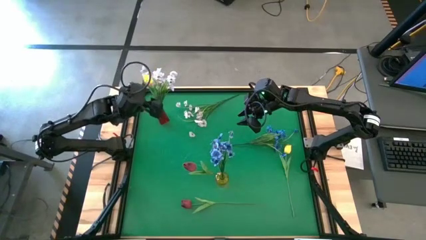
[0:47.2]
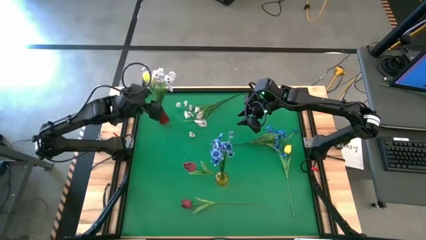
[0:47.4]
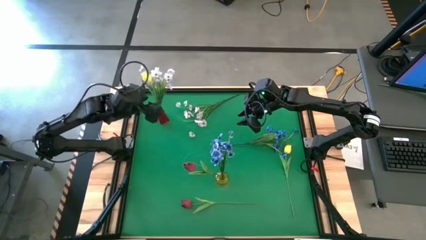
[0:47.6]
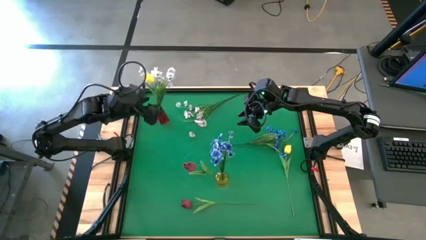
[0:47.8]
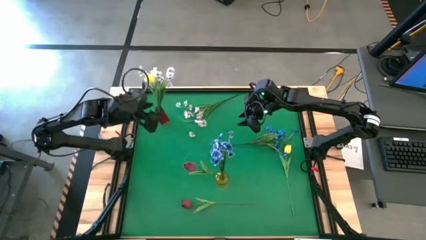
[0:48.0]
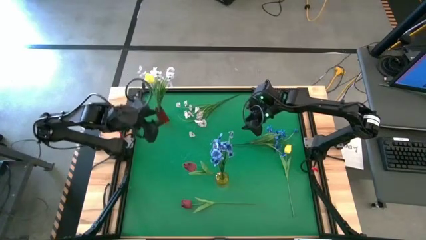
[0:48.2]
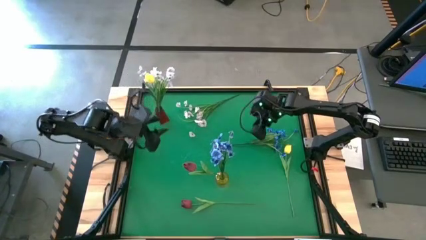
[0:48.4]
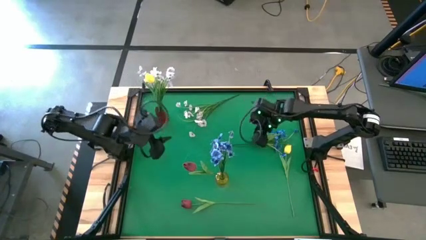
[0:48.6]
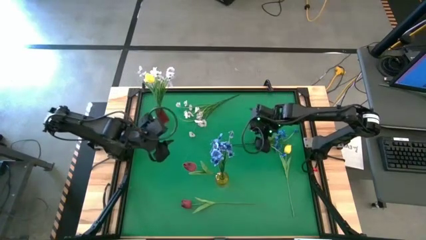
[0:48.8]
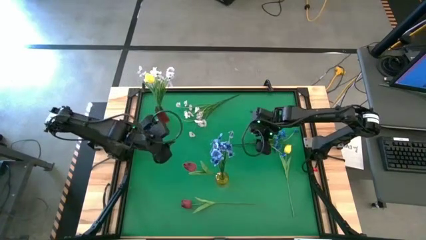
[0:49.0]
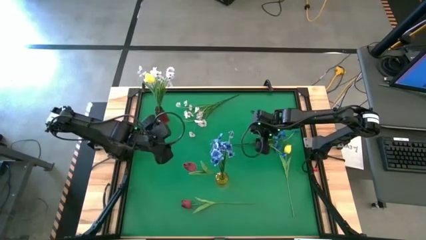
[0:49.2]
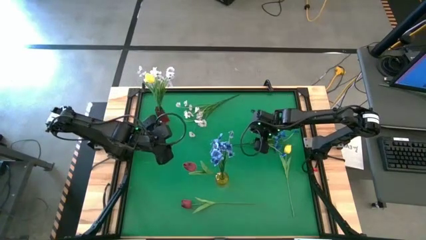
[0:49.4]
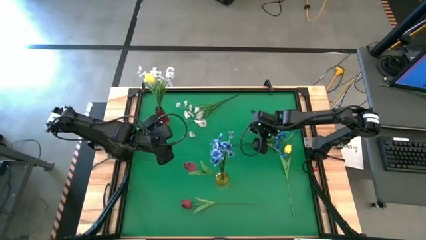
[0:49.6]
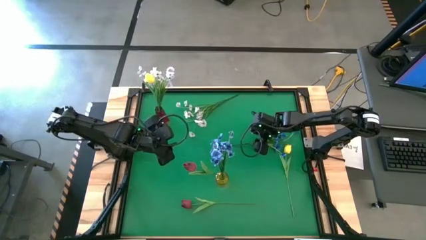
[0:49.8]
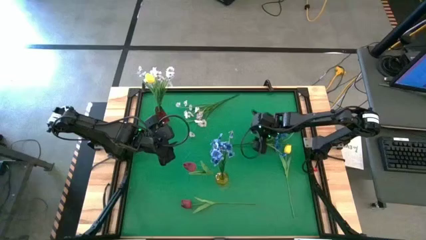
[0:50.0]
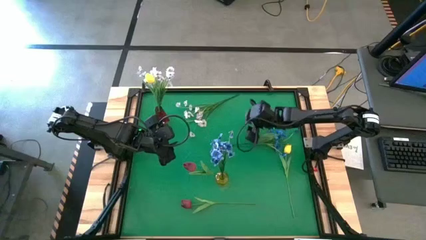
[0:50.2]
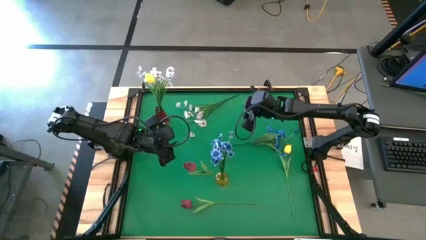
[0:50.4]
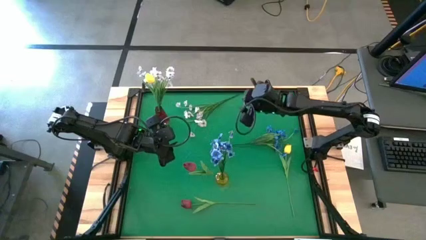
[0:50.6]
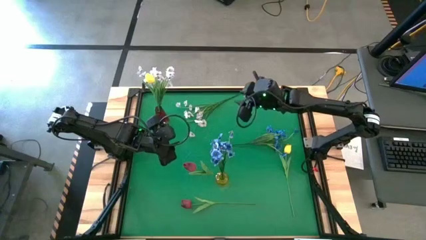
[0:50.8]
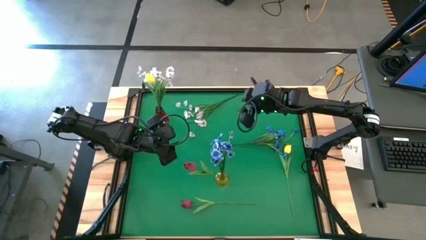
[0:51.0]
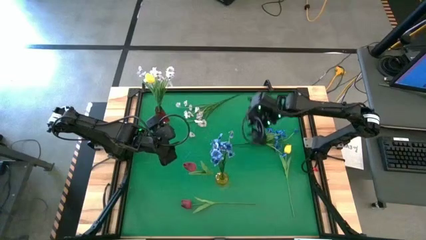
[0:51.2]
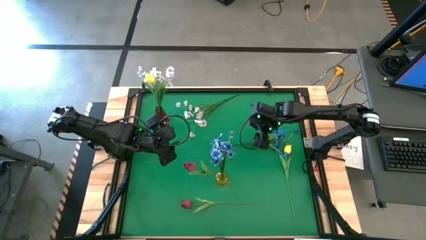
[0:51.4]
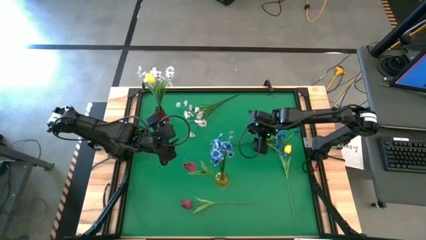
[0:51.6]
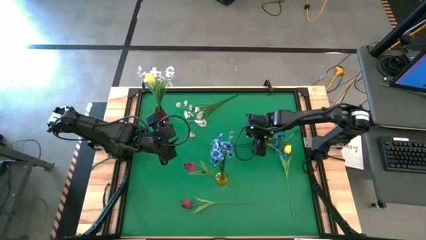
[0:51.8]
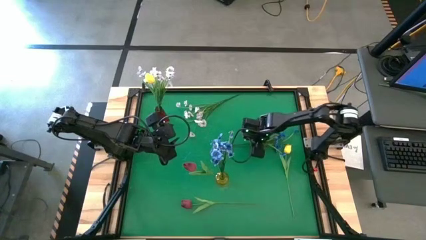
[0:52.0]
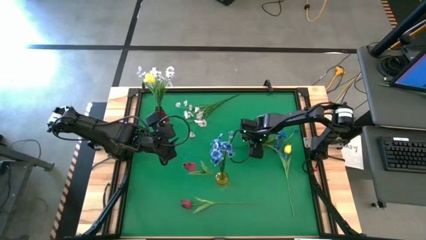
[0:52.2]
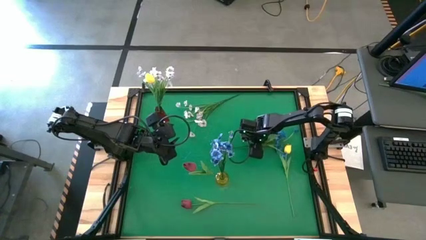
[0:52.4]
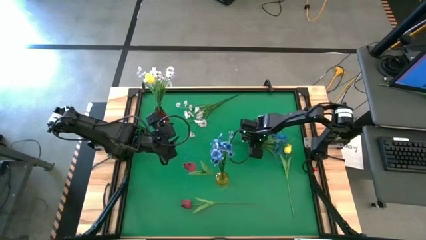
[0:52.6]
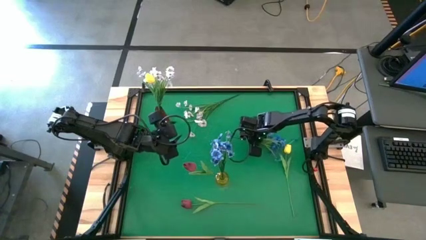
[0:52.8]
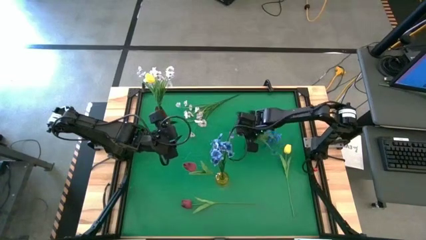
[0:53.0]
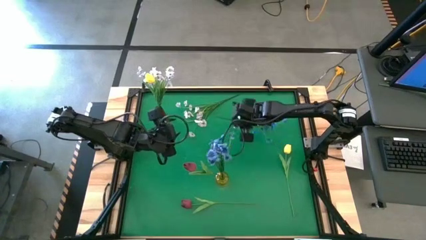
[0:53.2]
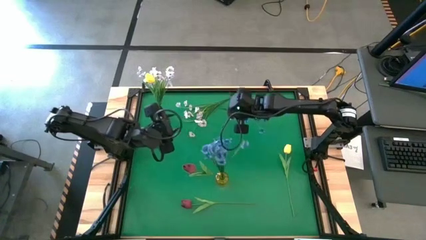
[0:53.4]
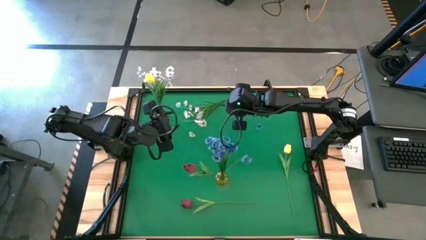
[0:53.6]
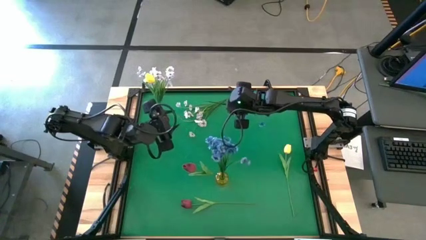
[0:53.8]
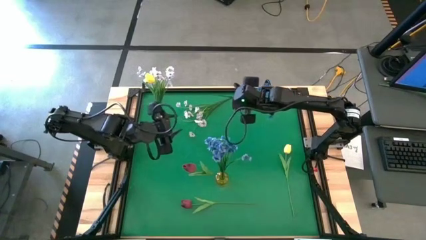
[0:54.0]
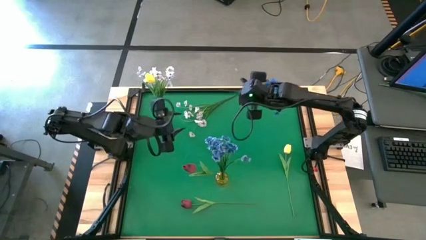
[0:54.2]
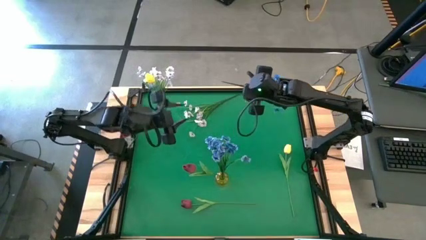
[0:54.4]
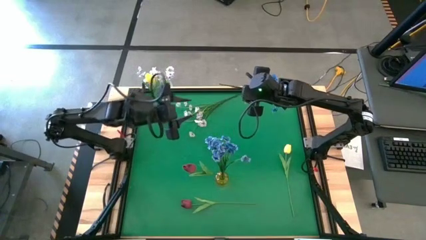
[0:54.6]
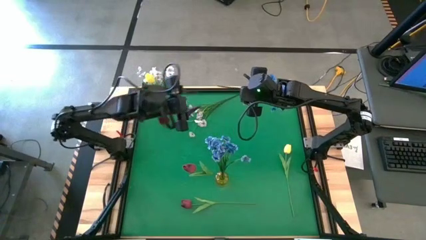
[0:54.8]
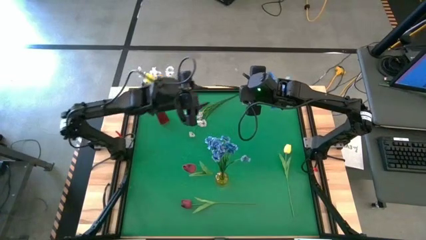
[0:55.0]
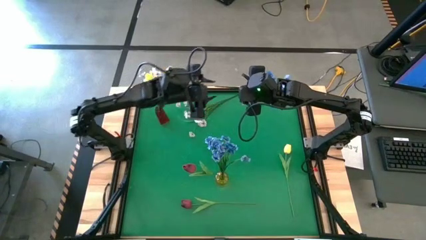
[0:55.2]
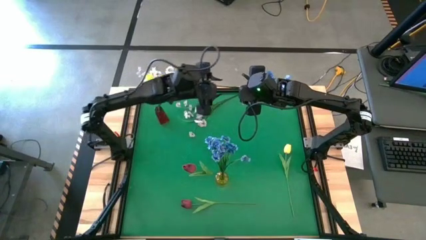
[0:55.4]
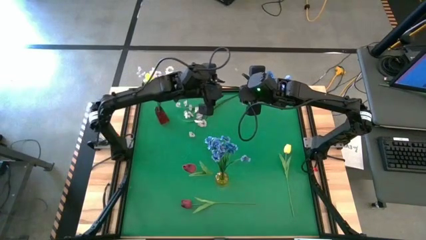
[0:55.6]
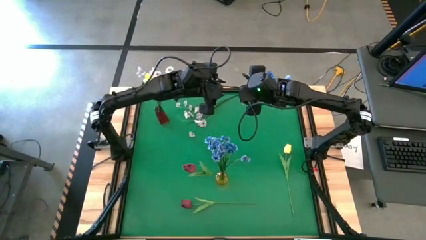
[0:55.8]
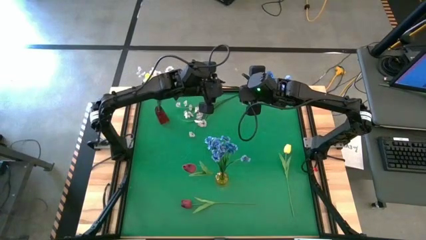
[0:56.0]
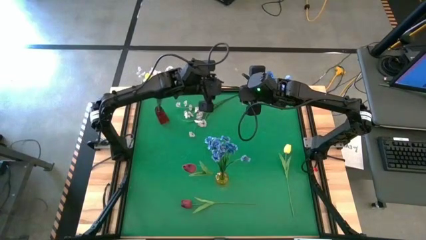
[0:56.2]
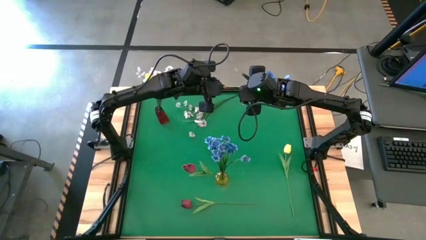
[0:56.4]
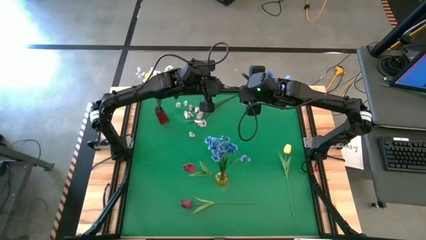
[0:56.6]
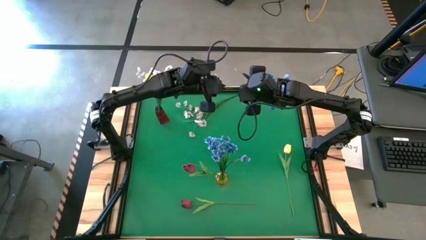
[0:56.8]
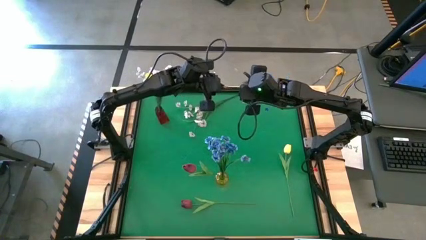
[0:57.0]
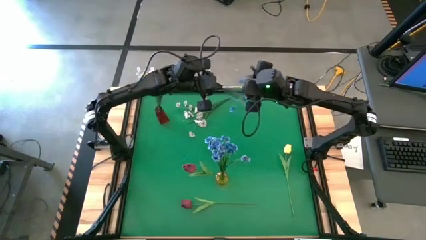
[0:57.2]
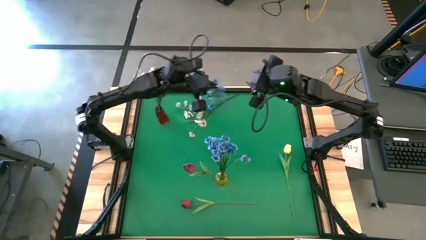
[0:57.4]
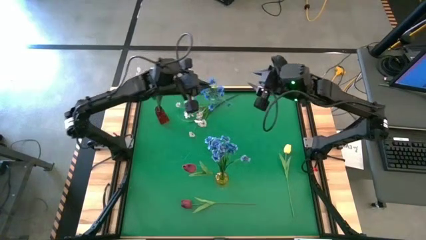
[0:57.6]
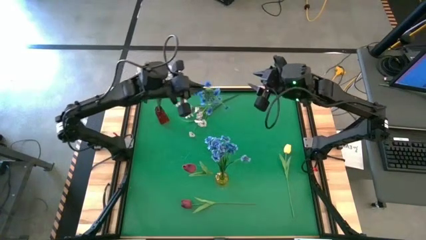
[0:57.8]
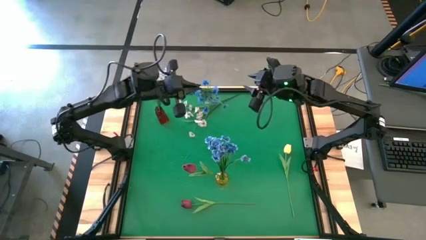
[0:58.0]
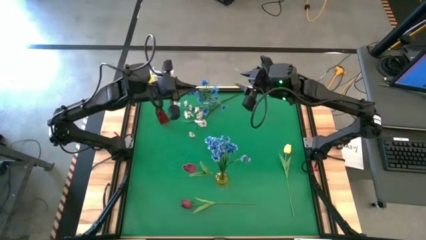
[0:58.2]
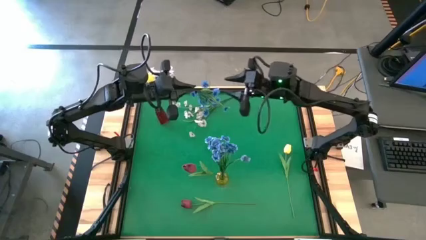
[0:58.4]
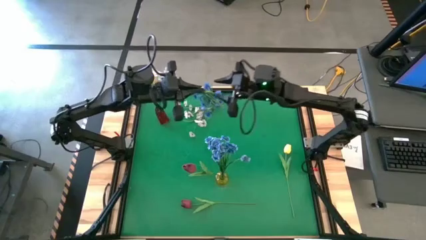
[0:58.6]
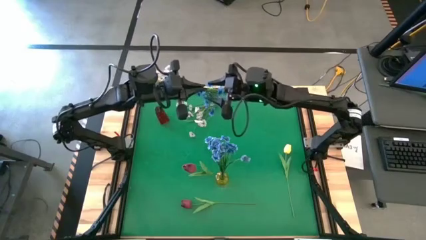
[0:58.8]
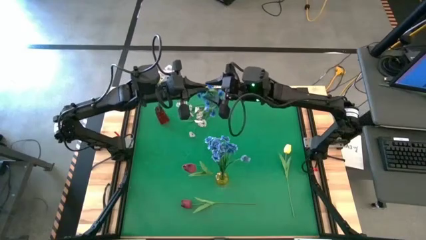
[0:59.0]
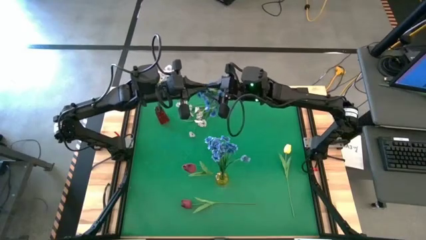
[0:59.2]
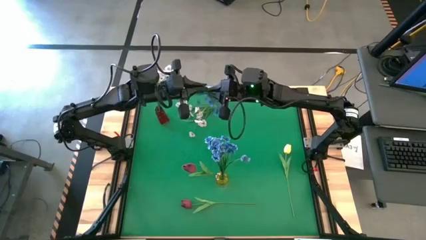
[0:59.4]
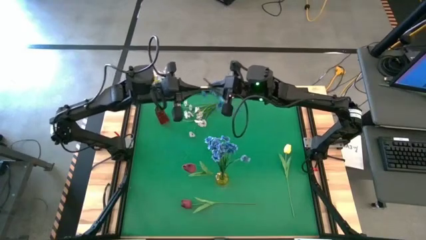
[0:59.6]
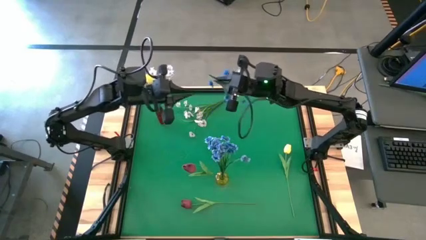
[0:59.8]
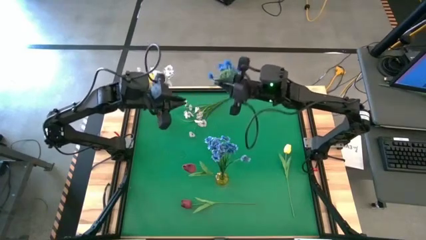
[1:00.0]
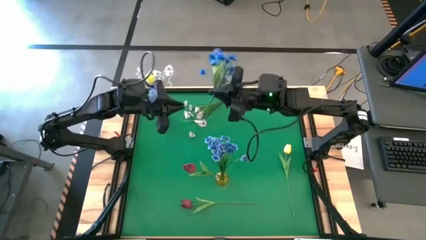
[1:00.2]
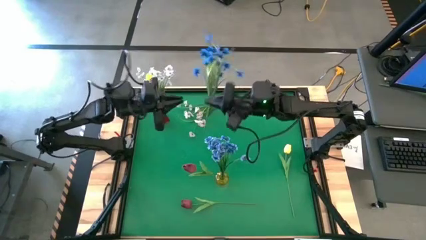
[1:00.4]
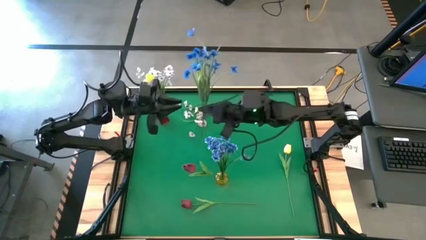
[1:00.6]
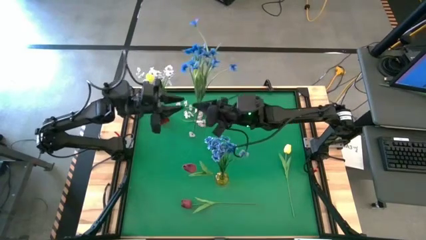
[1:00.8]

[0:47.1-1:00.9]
Task: Sort flowers into vase by color
Put the blue flowers into the yellow vase
